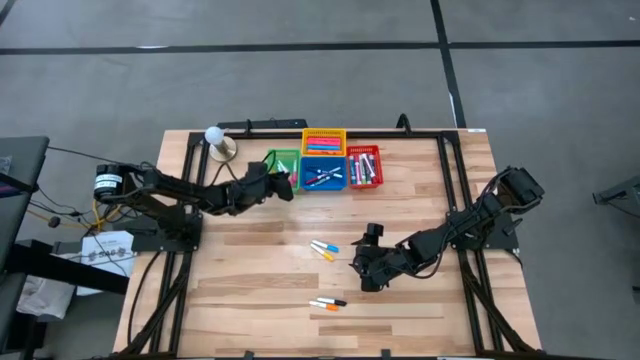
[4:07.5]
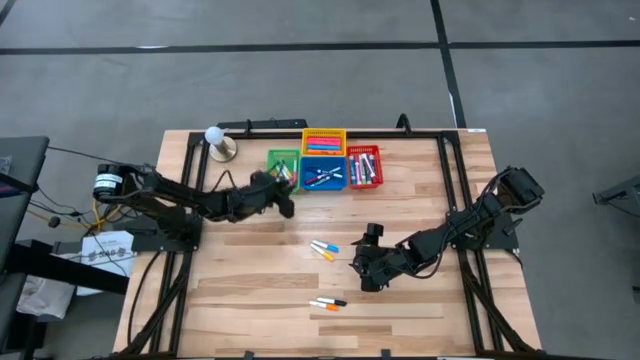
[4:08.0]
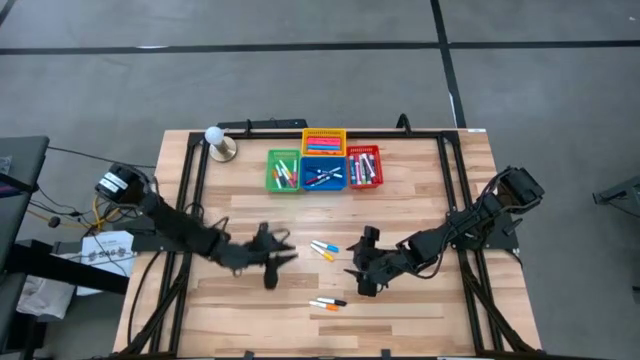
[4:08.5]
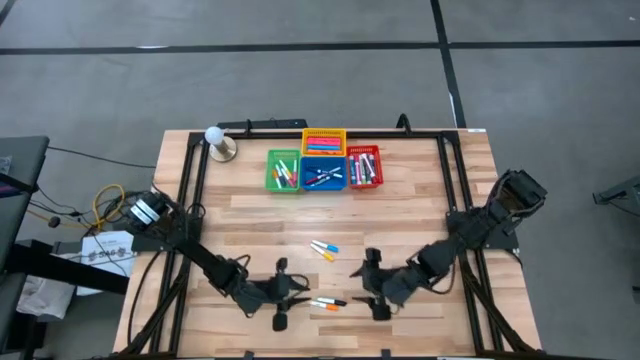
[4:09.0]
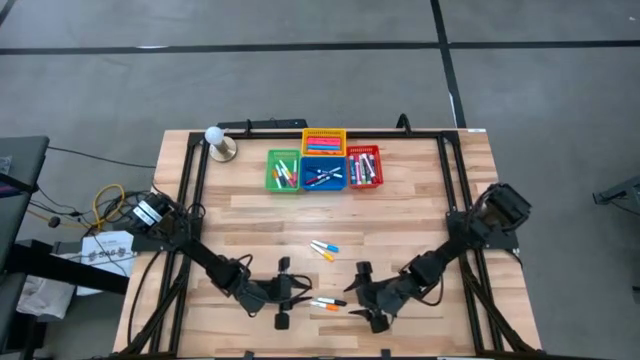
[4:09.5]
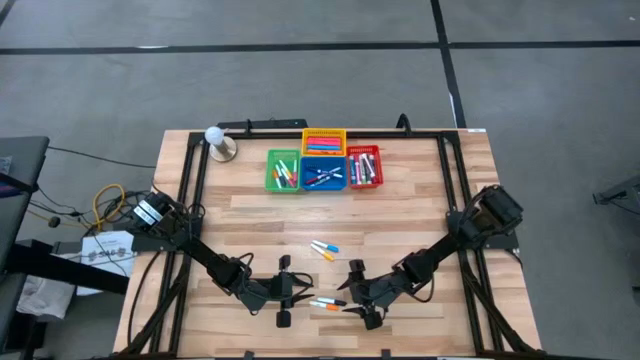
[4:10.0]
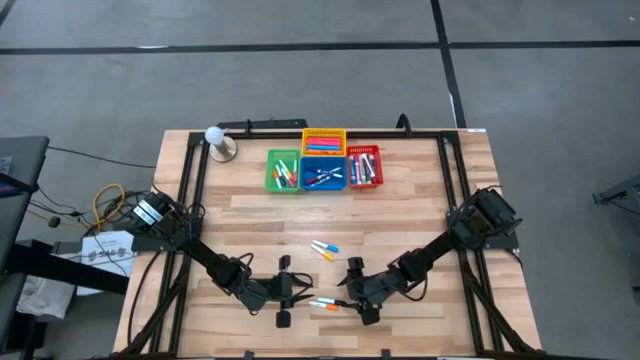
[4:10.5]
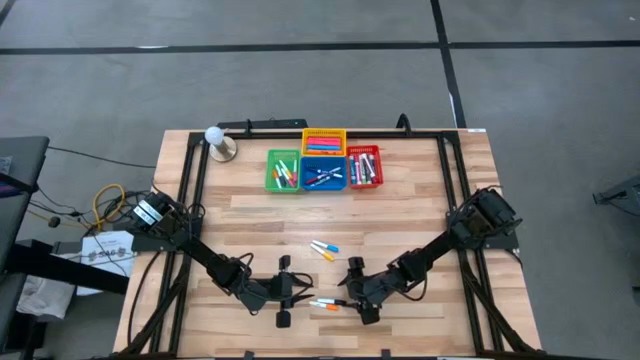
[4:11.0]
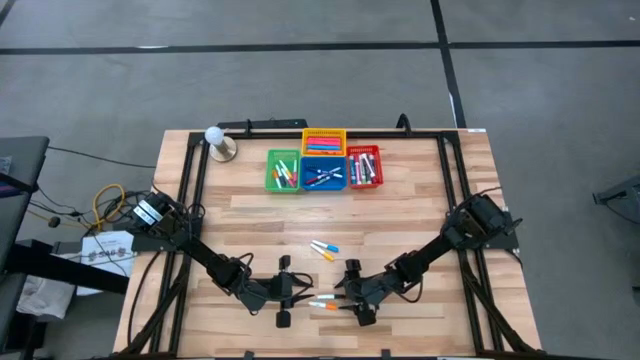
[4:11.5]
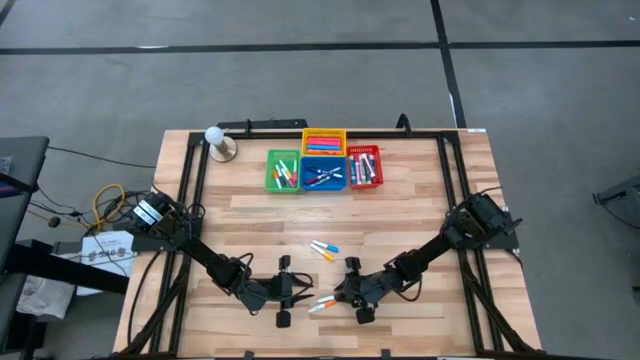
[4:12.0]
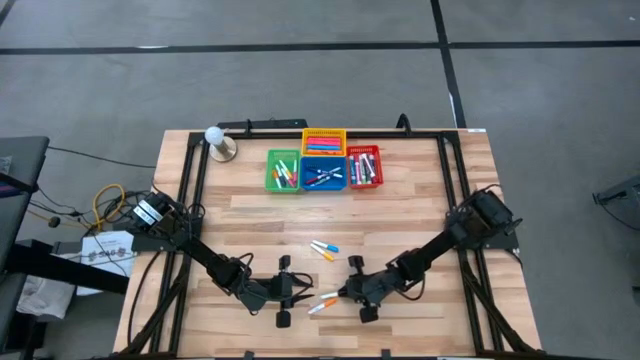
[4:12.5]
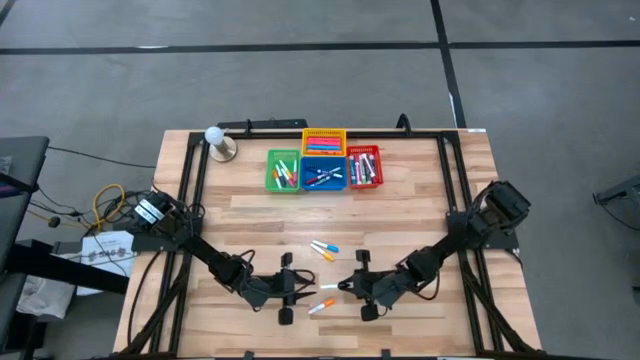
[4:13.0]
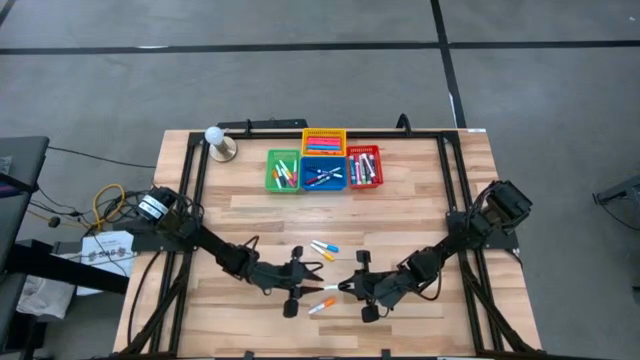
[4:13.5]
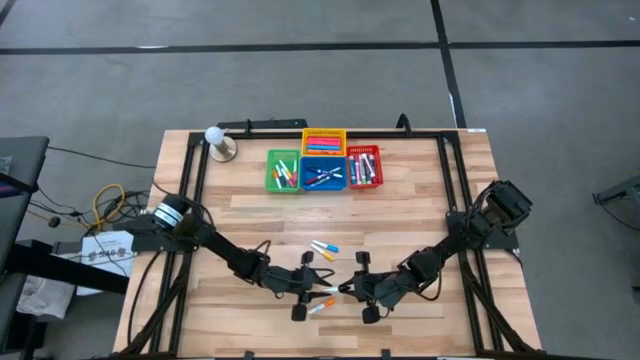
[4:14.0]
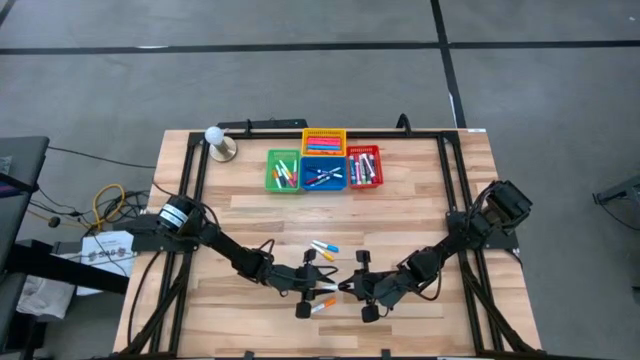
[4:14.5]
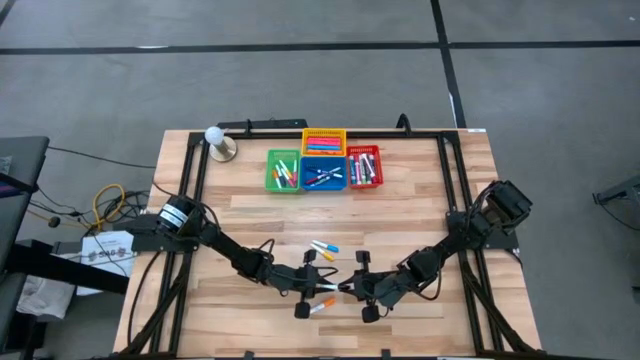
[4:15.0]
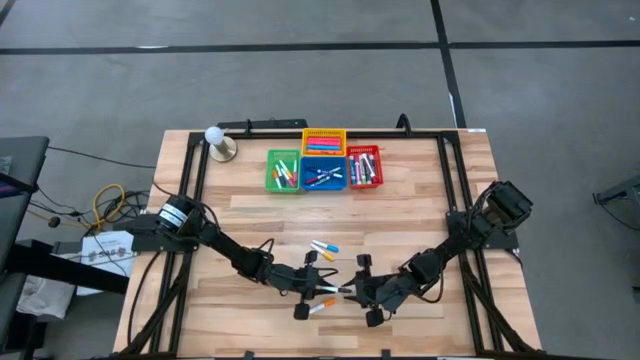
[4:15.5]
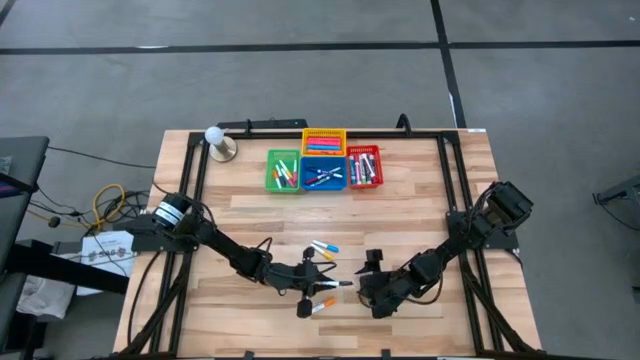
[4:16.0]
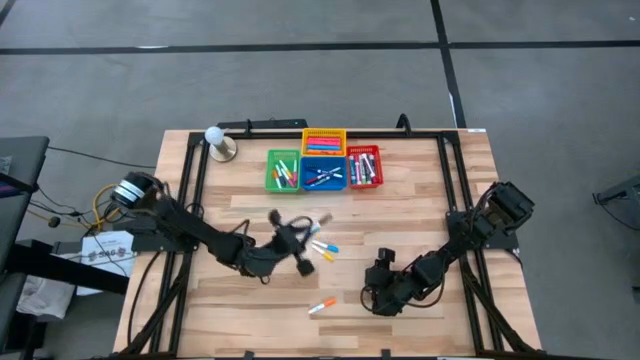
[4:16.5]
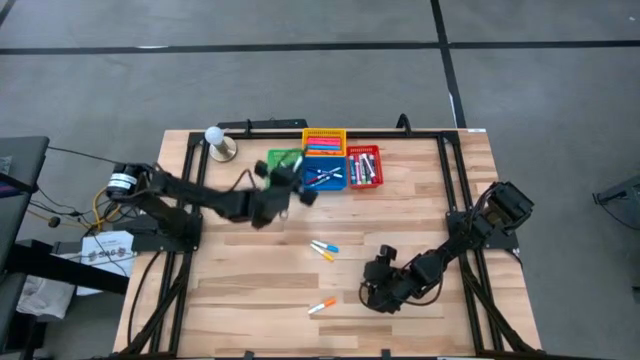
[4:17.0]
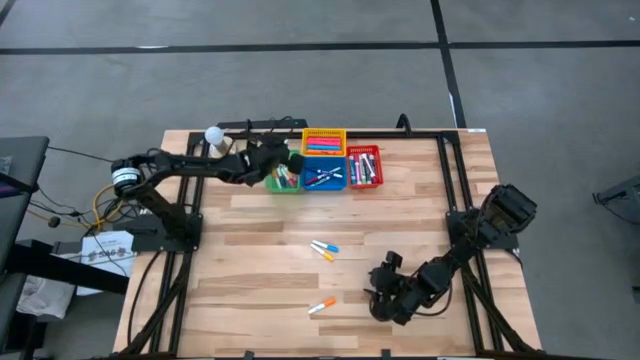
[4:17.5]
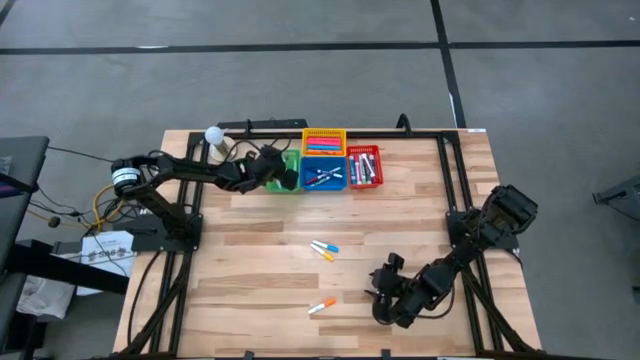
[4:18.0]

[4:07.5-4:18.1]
Task: Pick & Place Markers
Put the small black highlighter pen into the green bin

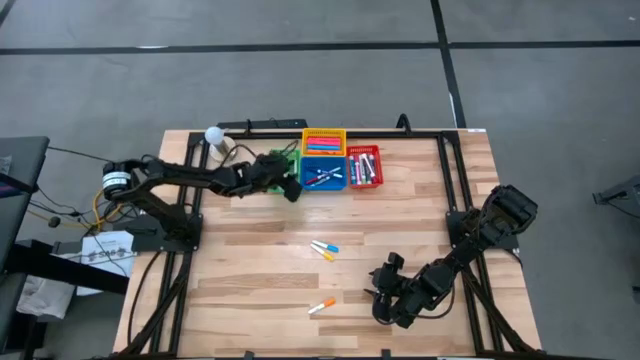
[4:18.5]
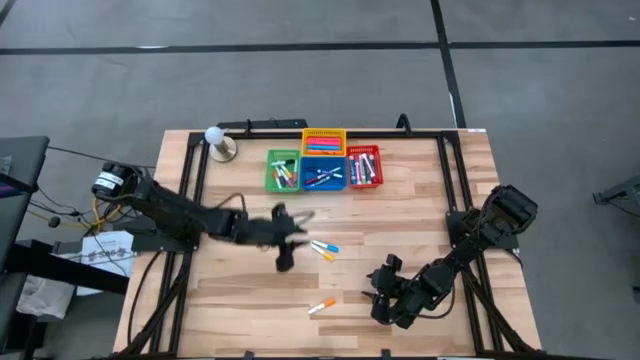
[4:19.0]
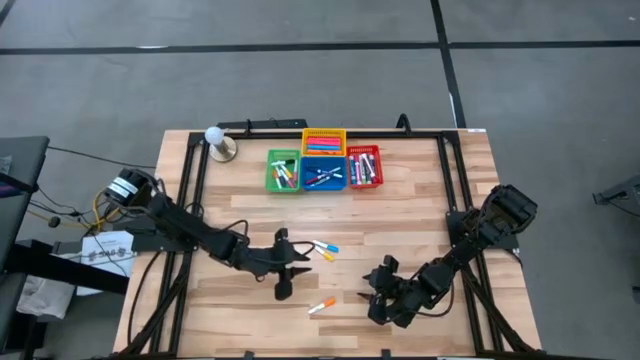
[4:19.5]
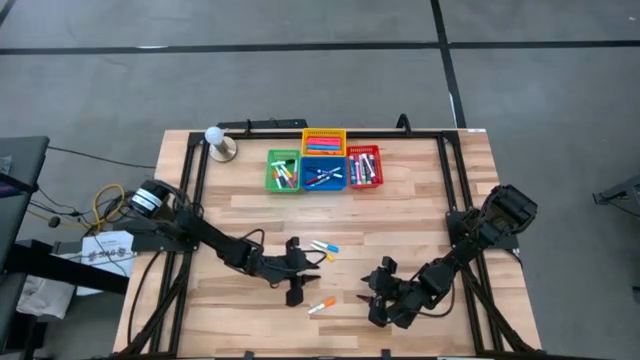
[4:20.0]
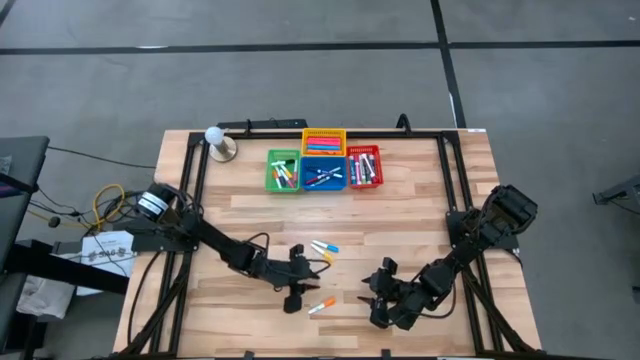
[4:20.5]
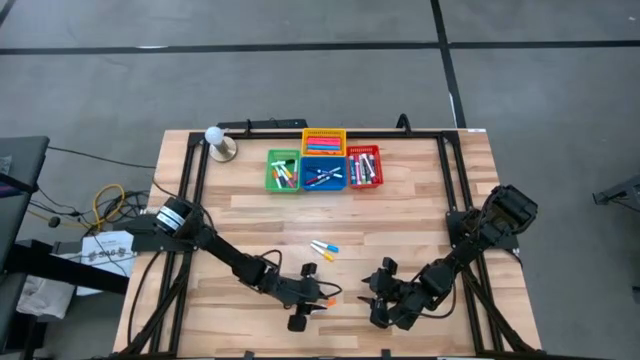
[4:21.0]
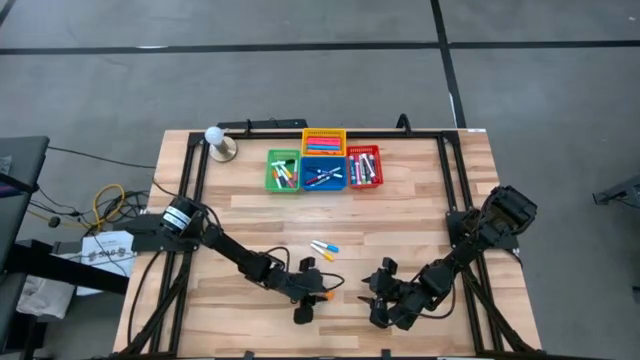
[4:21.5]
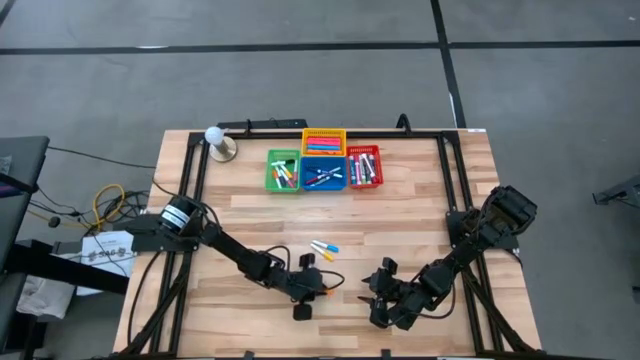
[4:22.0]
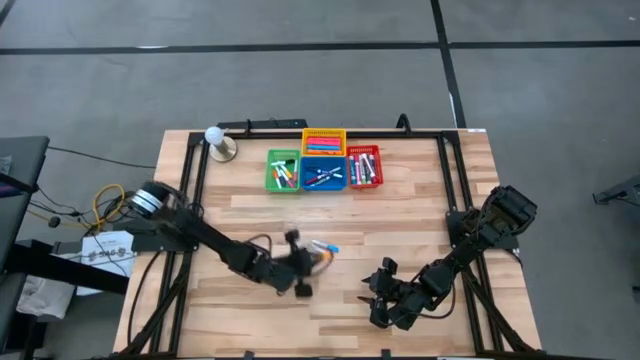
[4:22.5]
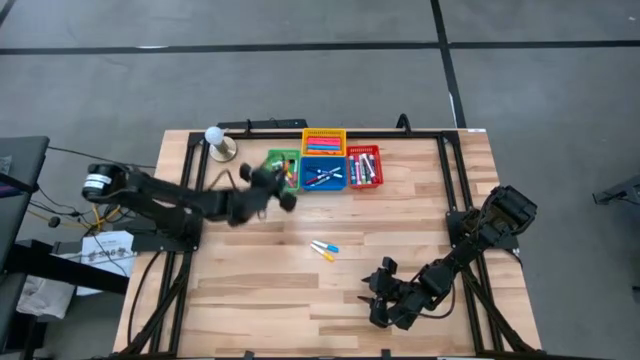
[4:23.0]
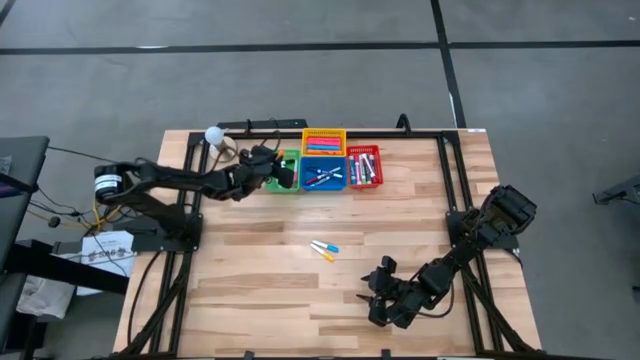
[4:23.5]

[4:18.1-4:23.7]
Put the small orange highlighter pen into the green bin

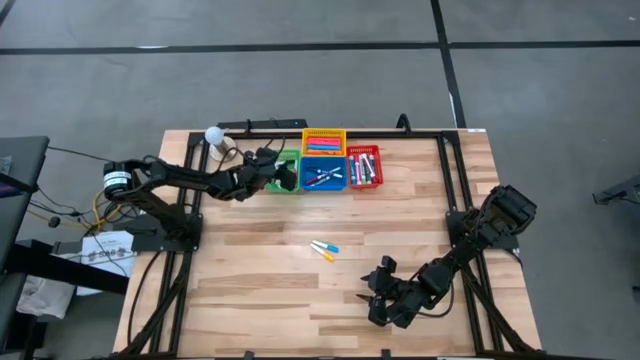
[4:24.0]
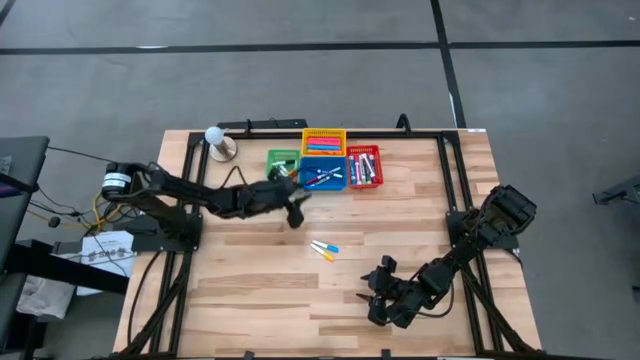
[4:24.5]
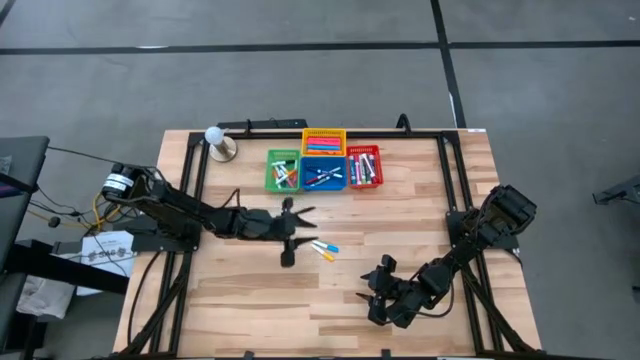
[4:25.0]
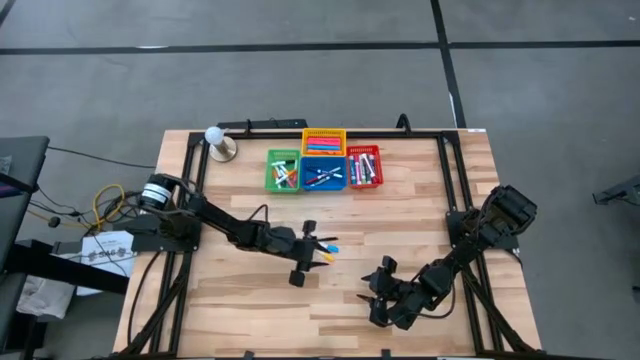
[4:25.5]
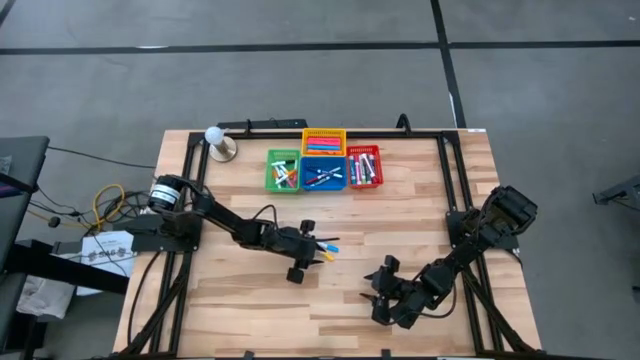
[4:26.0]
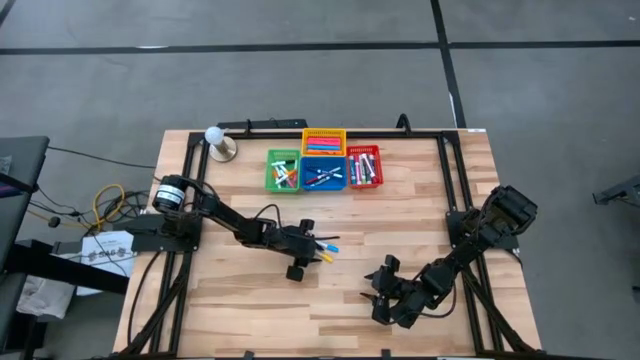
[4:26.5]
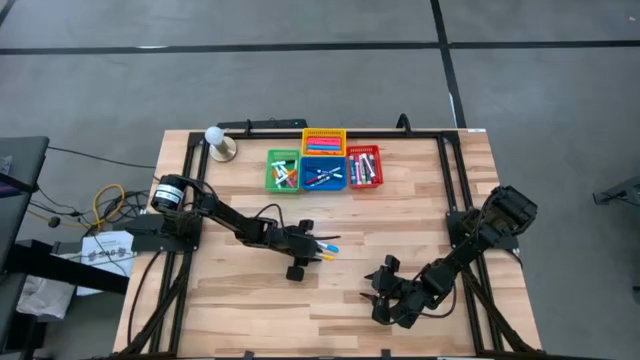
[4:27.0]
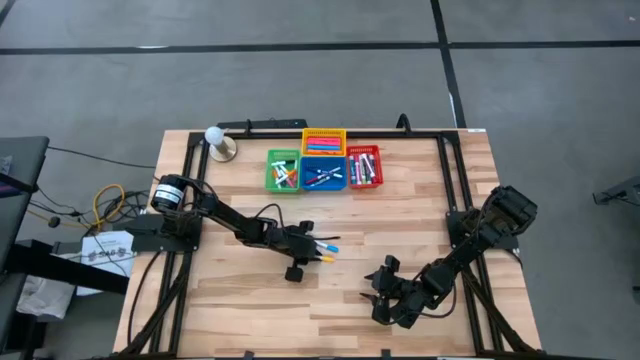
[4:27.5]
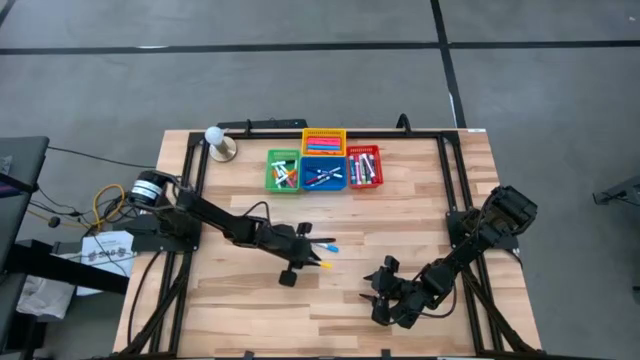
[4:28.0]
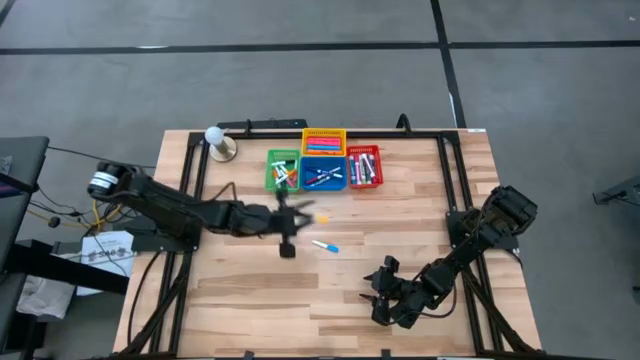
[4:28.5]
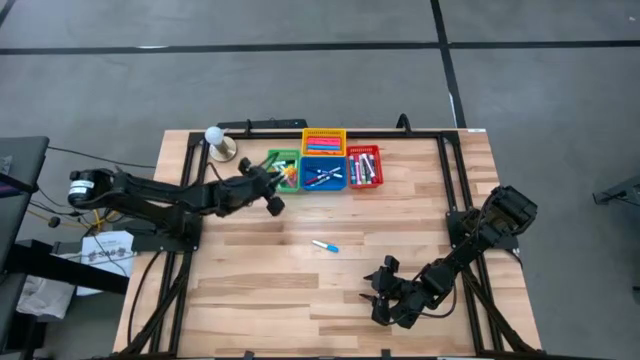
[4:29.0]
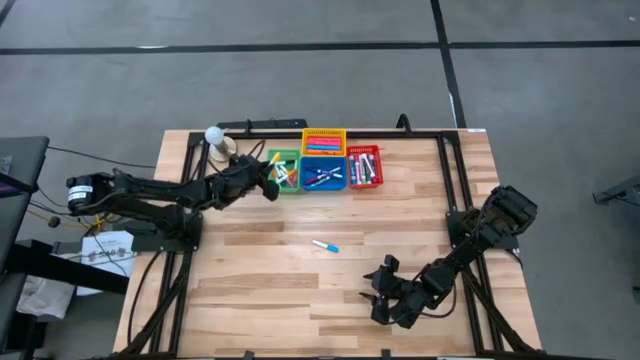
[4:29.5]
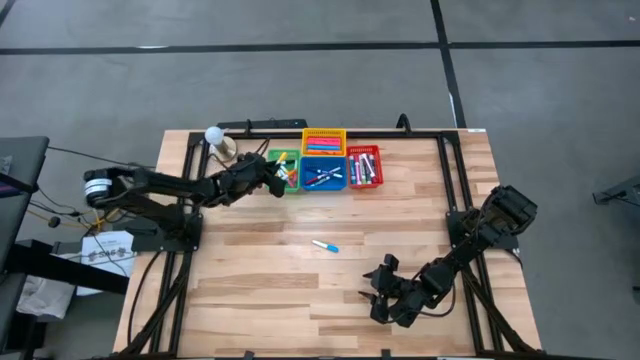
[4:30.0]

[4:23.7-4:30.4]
Put the small yellow highlighter pen into the green bin
